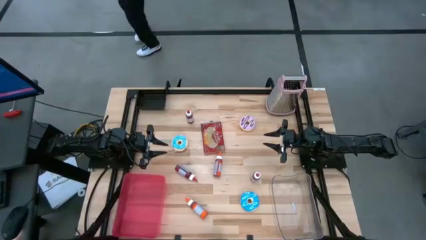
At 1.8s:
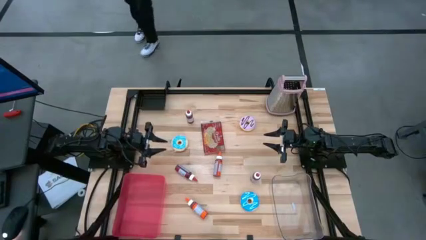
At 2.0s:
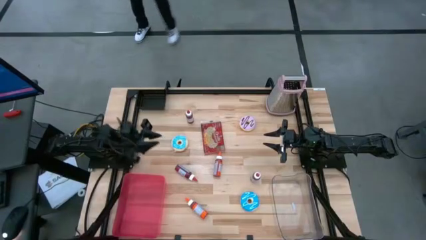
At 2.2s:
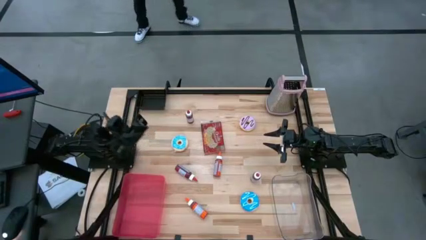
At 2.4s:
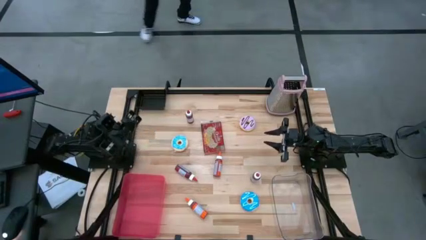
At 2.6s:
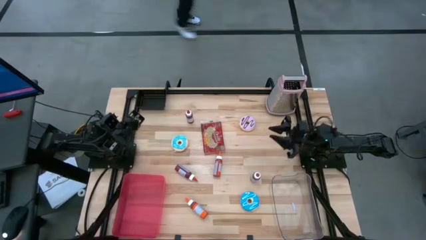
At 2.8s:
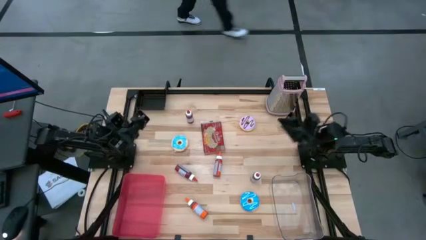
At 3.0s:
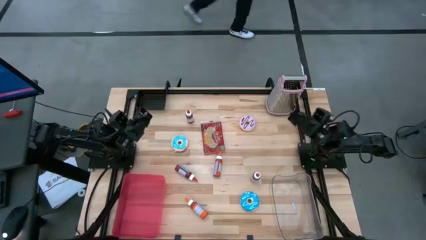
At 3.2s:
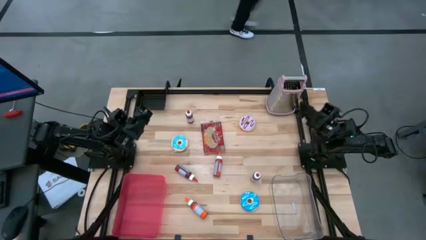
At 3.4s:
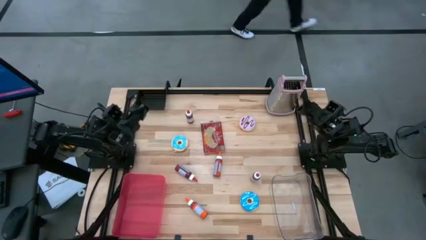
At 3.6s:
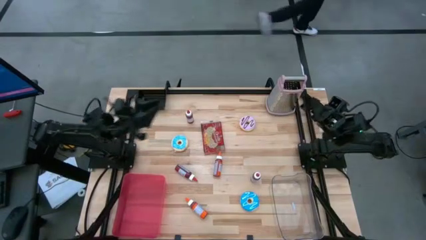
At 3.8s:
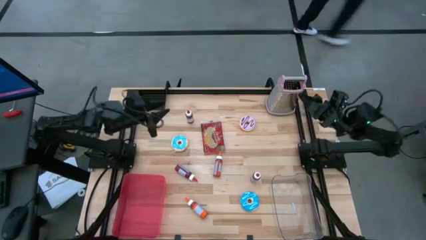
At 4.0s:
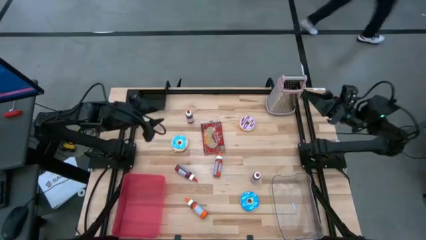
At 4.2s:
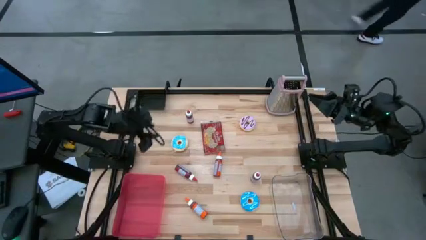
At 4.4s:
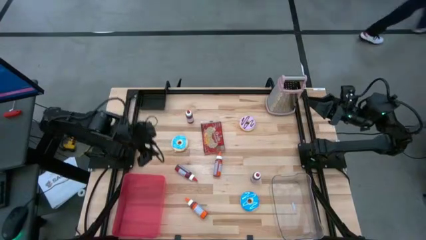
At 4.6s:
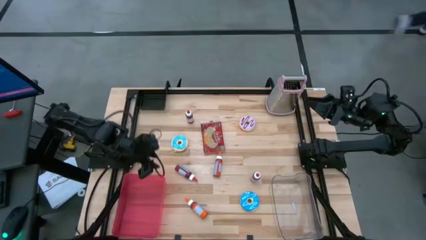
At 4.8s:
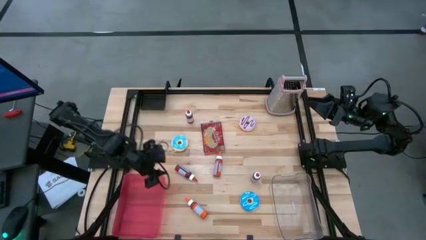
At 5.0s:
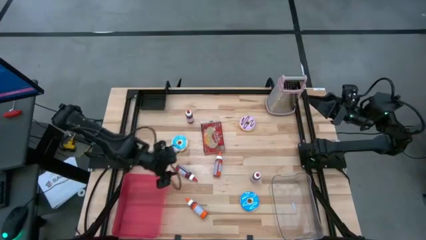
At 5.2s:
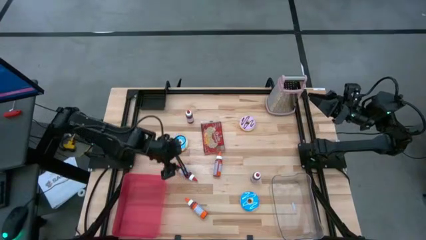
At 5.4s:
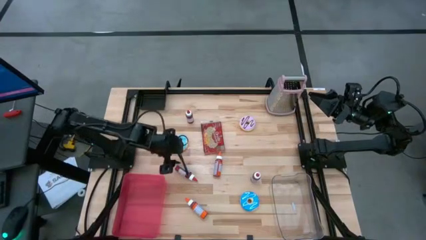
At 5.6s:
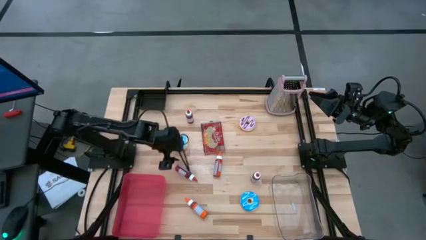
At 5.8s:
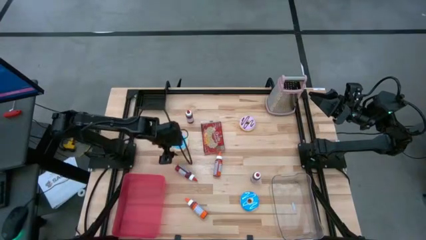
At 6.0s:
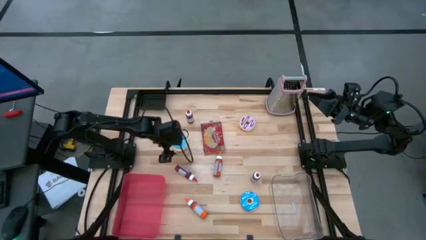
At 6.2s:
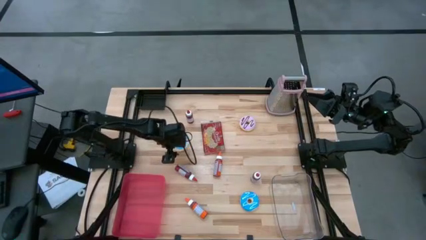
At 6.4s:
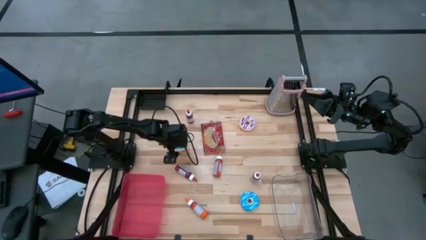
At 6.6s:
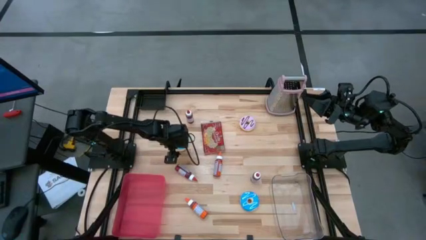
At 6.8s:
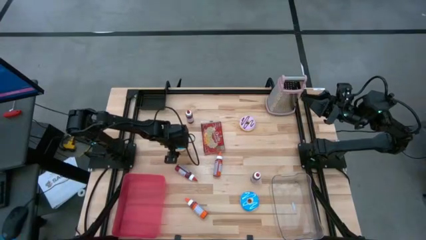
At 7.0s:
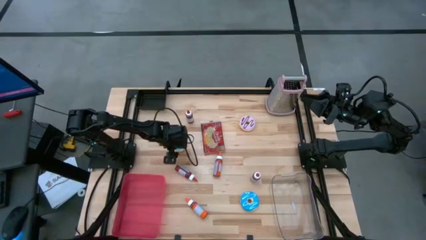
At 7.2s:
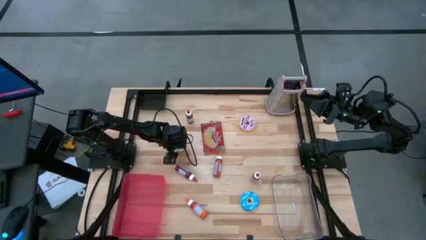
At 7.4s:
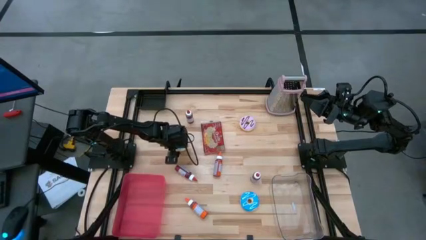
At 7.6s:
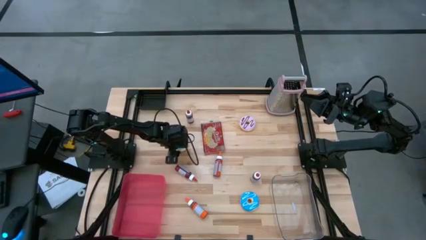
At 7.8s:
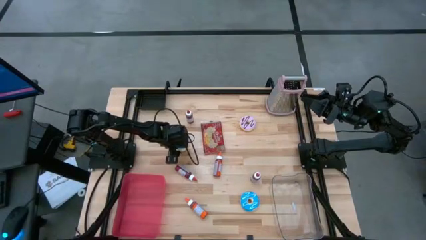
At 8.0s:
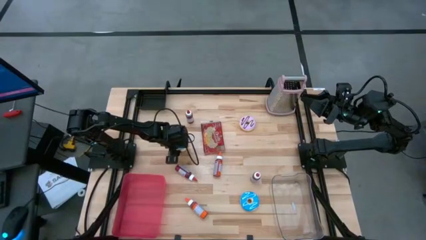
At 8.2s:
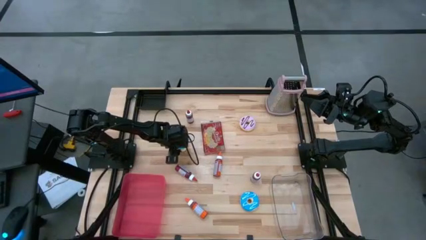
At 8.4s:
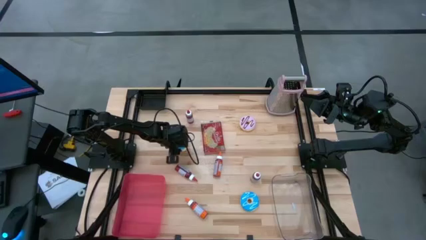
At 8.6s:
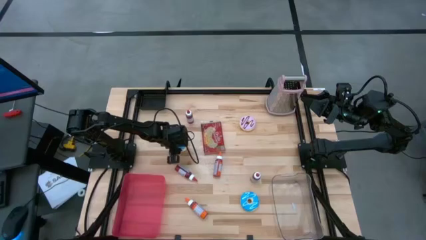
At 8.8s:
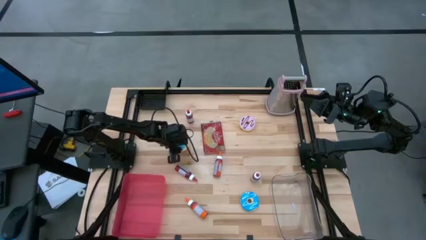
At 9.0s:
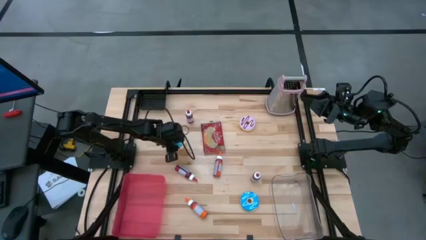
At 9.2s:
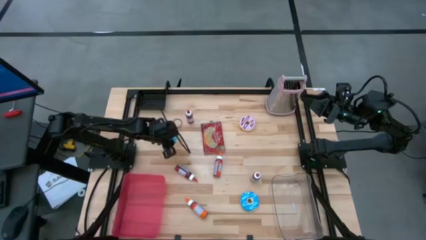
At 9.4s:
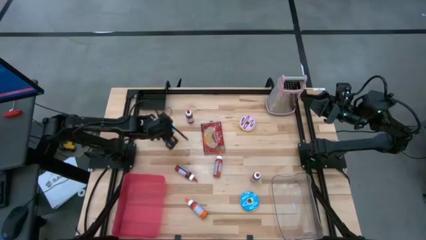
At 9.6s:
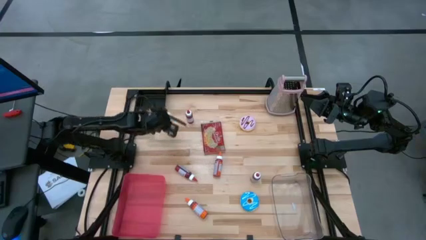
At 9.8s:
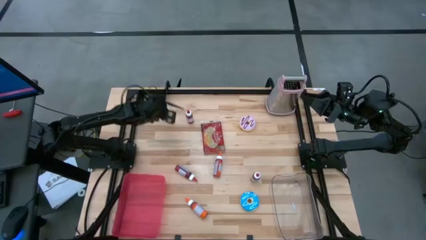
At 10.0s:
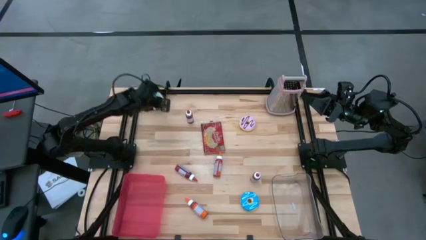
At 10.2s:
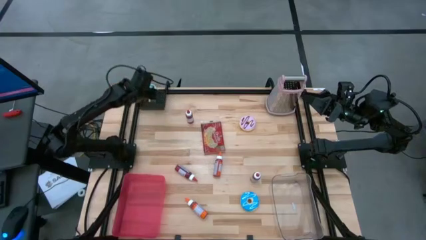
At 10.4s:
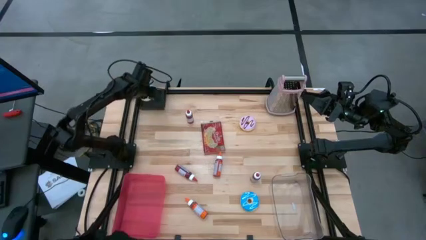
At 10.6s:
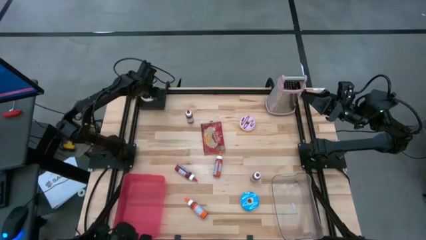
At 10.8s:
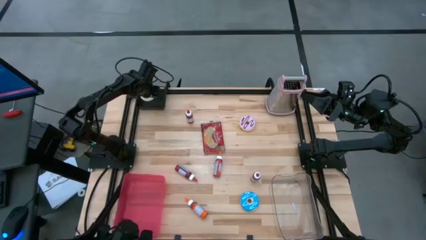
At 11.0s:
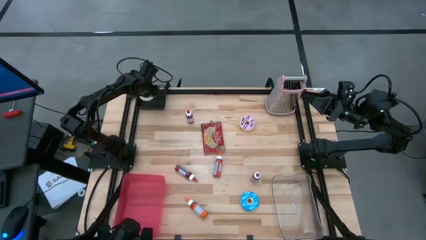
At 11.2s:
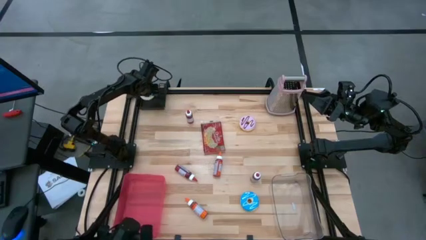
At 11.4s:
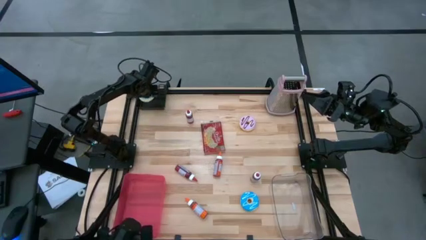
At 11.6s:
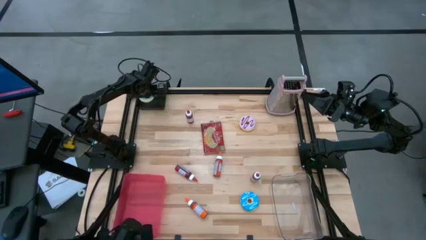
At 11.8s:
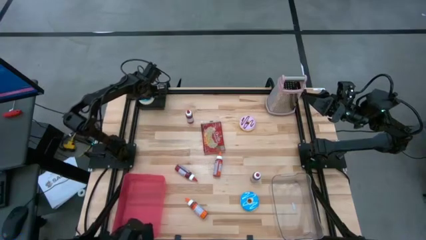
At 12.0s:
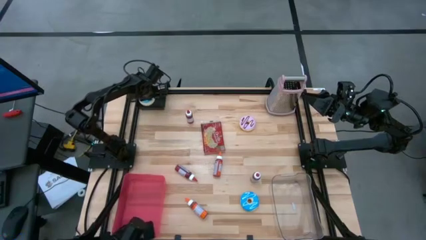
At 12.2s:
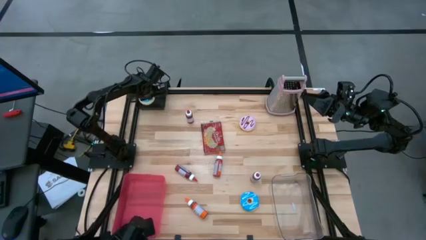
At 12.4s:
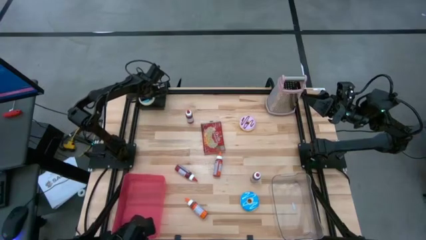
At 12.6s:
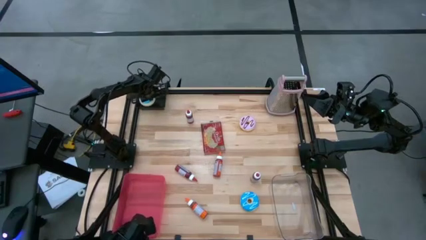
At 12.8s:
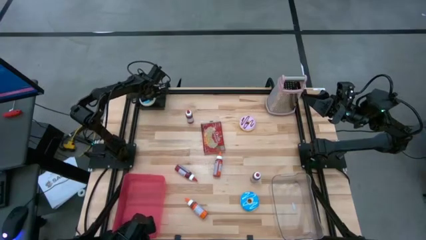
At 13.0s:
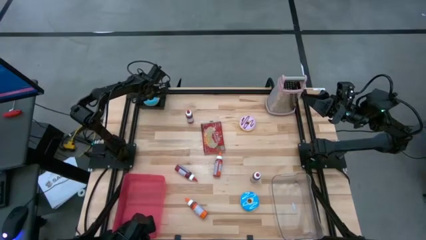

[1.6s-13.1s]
Put the top blue donut into the black bin
